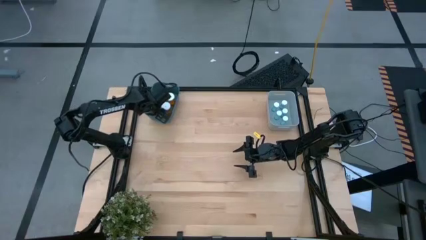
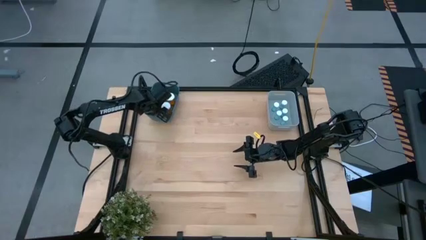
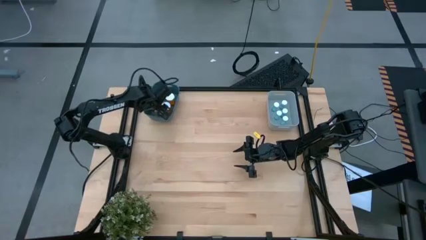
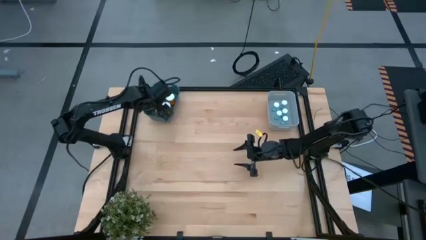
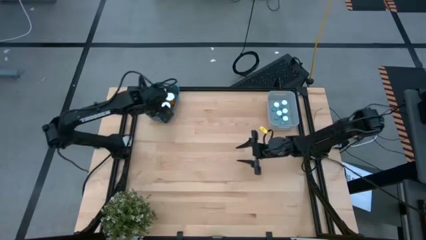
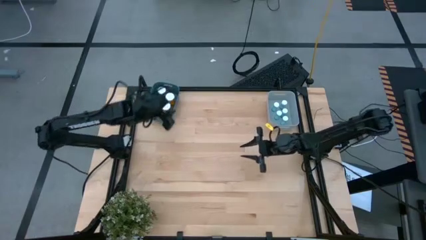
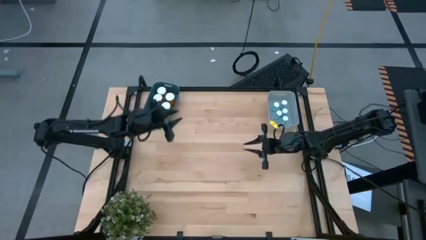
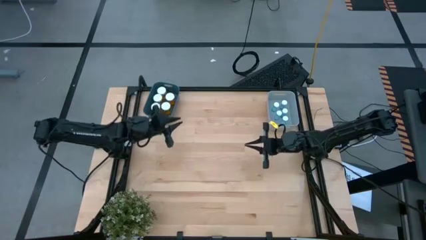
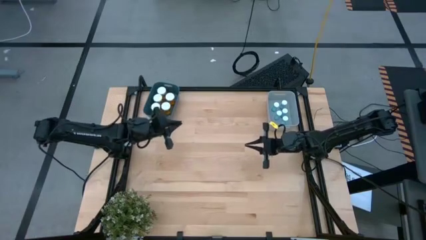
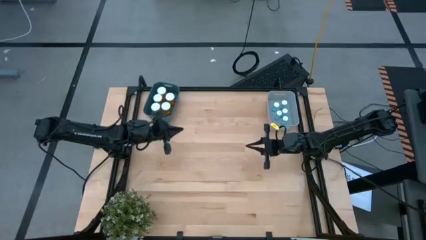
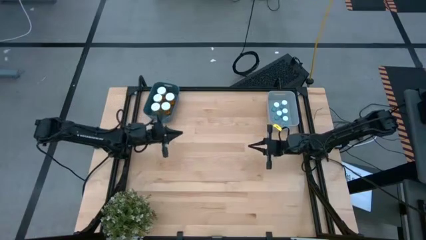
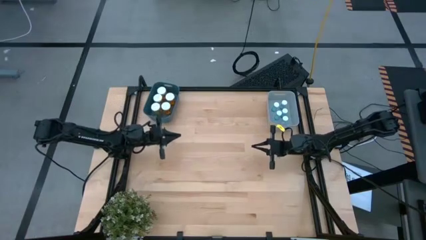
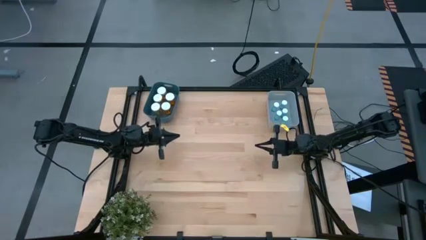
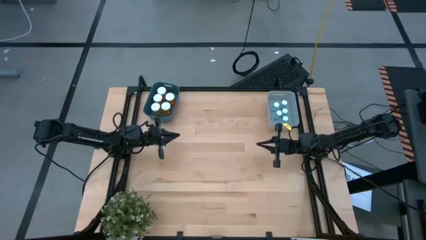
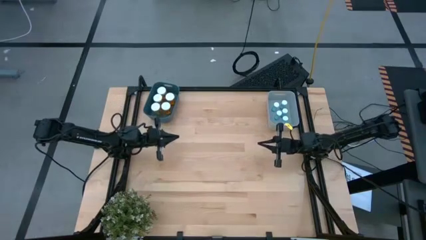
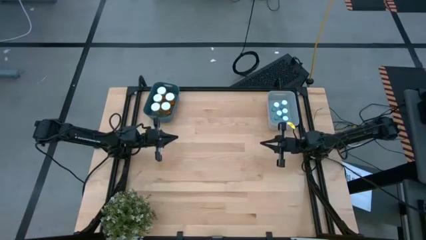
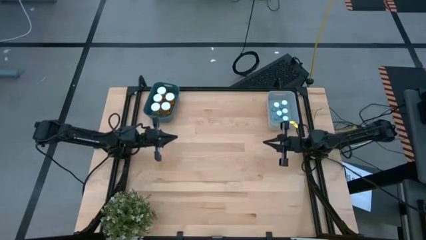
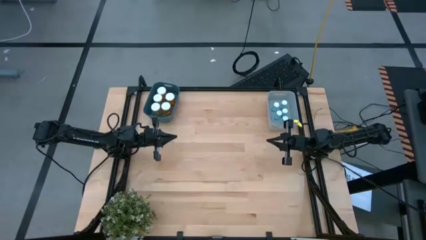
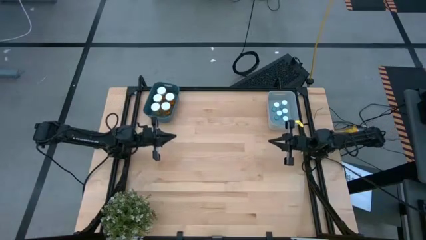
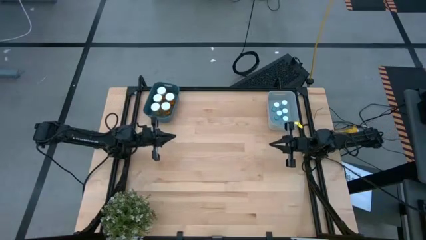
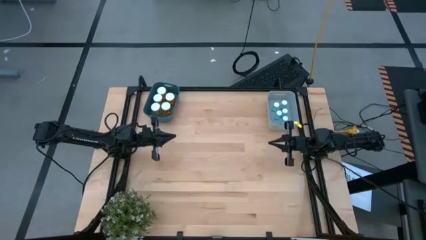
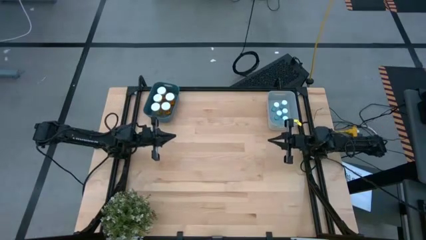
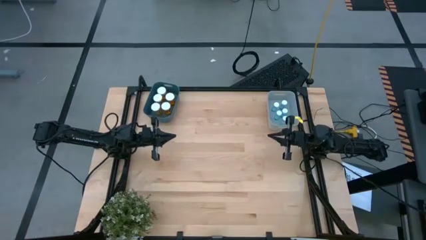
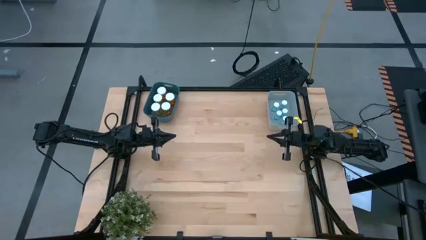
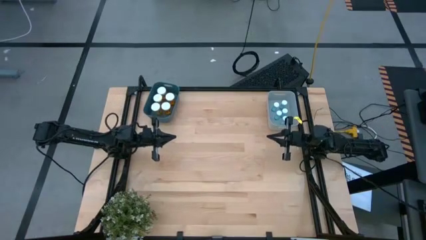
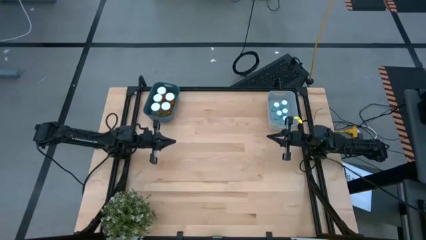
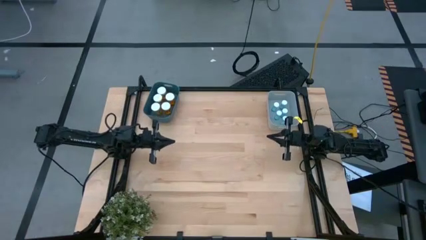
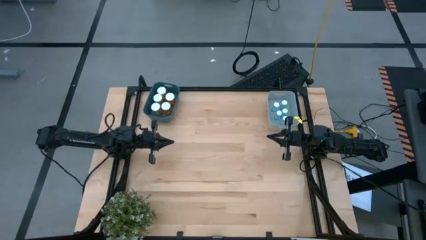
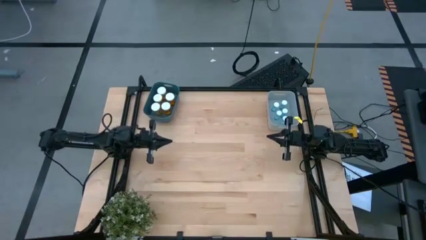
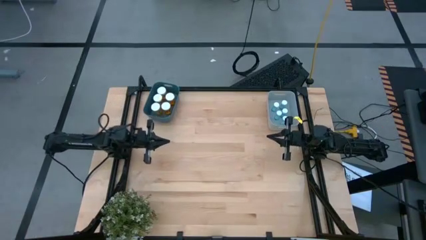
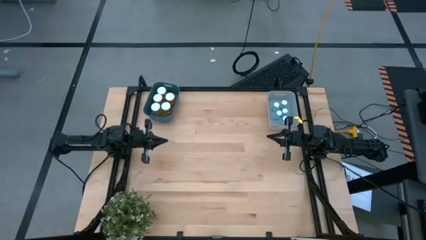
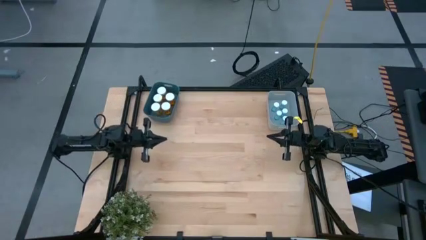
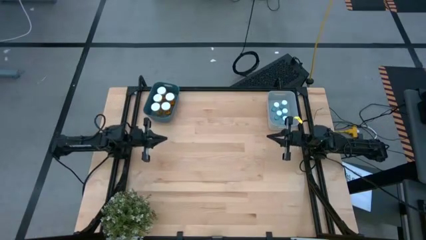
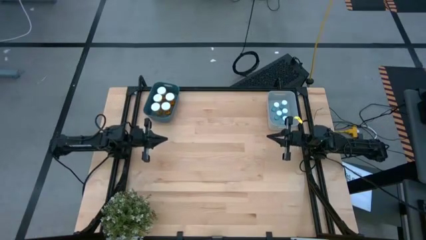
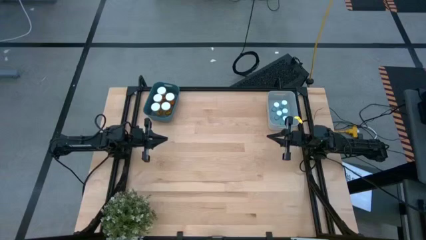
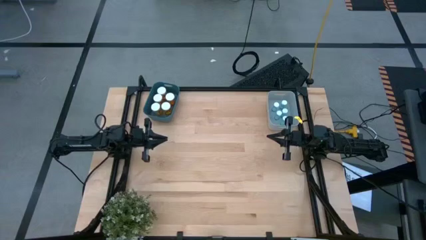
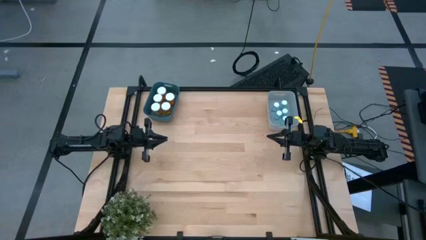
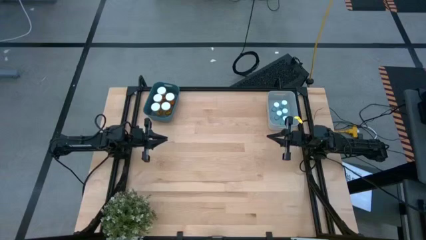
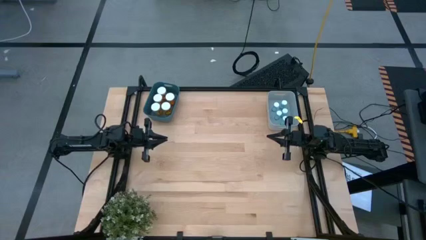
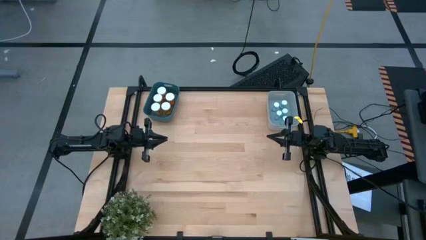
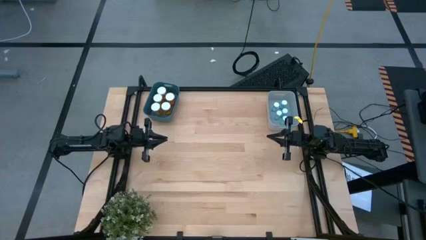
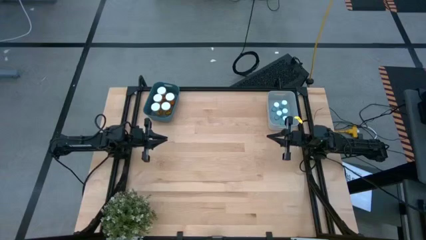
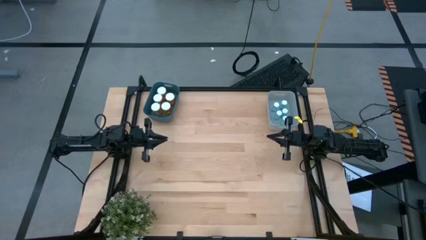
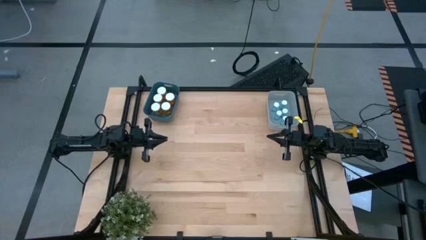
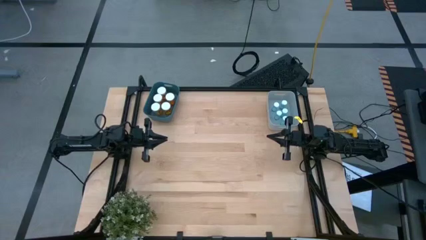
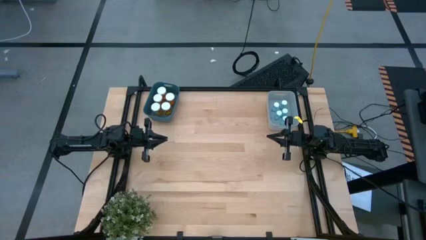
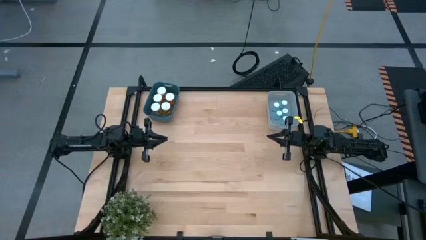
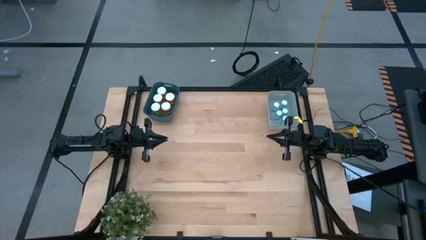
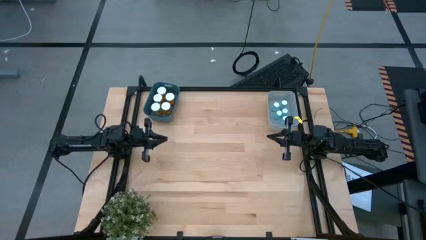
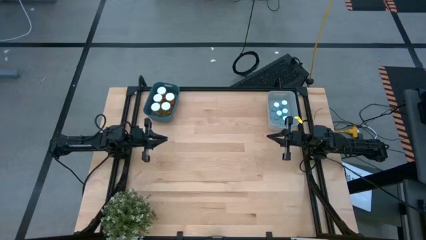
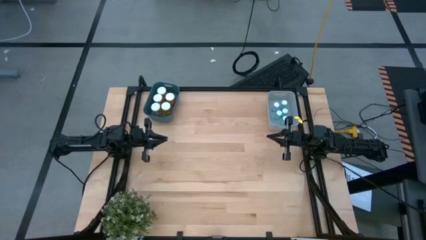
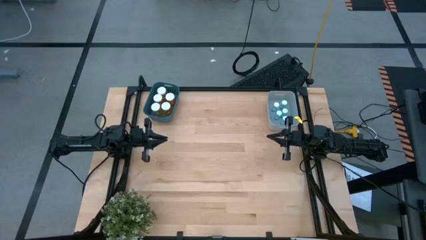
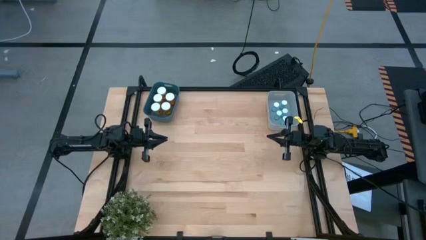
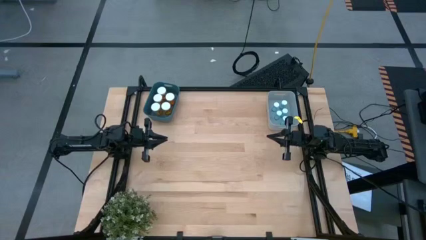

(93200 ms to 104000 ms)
Task: Pick and place medicine bottles into bin by pill shape (circle, oval)
Return to Home Position

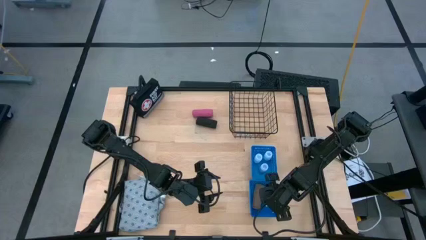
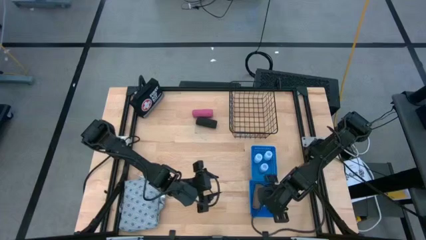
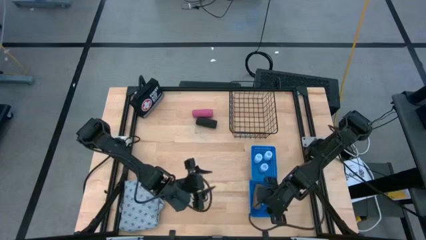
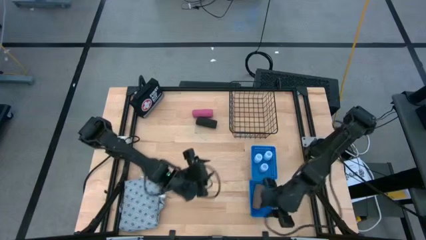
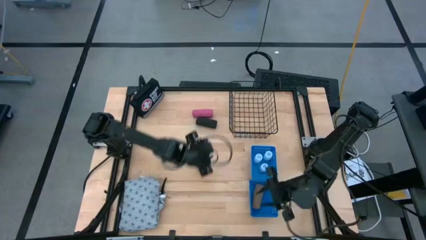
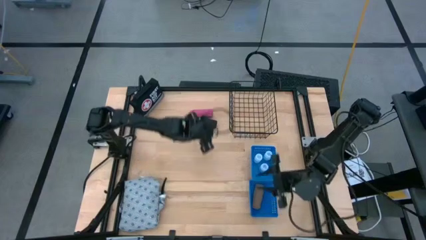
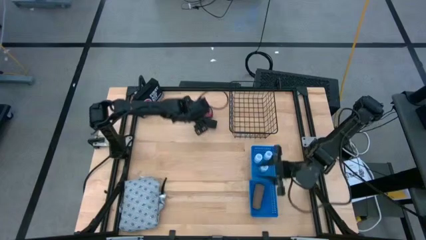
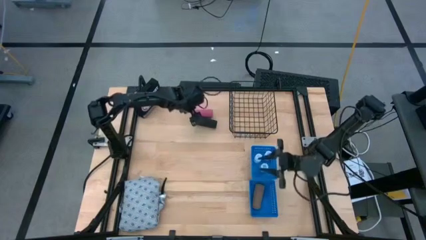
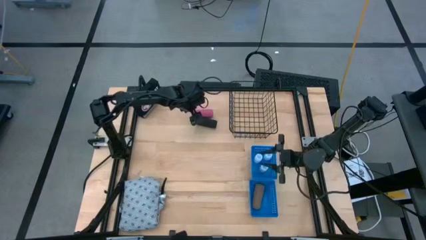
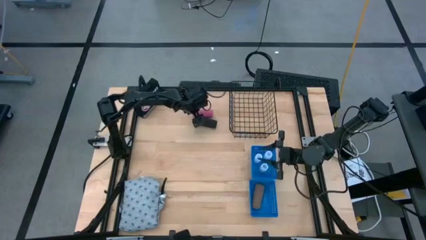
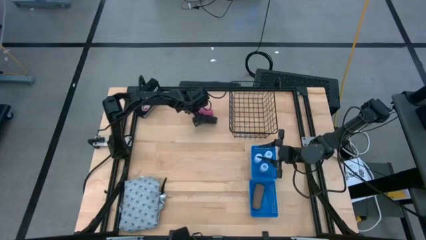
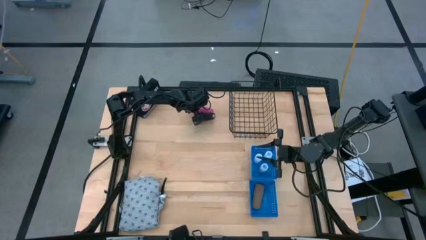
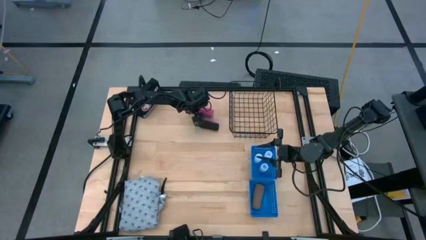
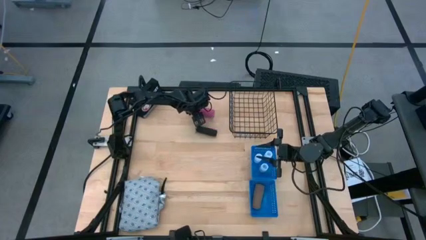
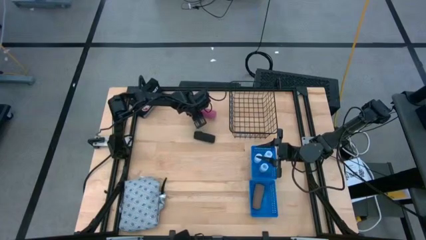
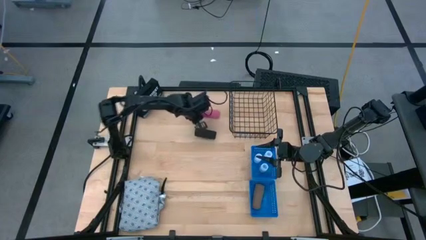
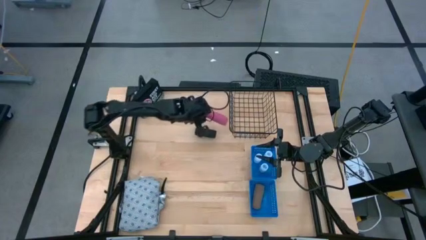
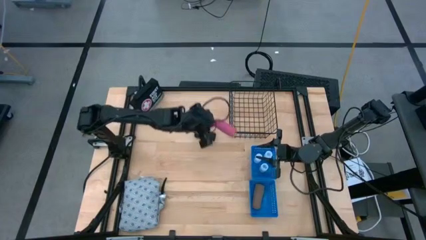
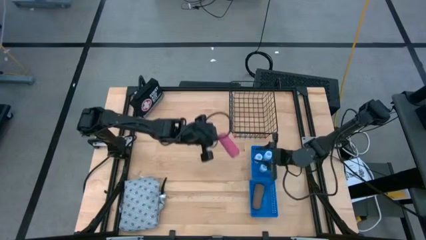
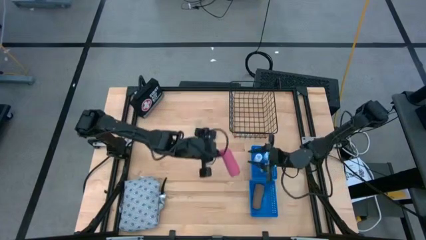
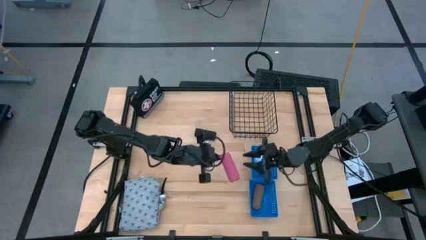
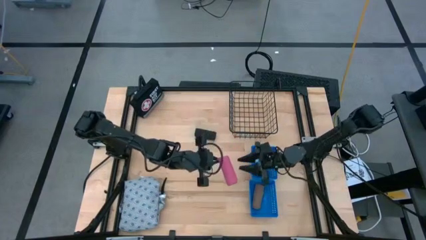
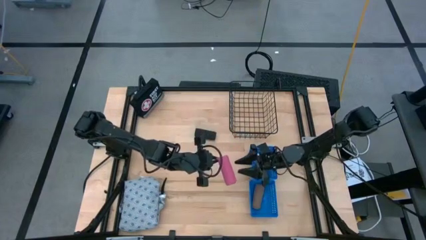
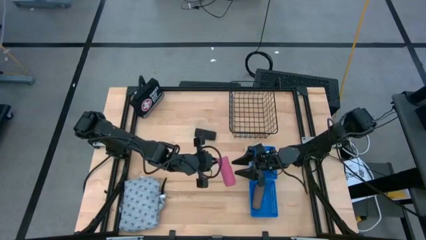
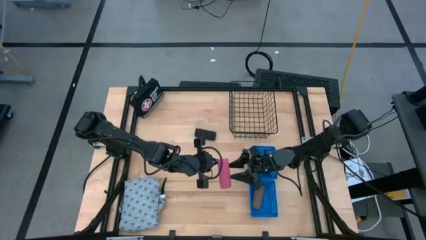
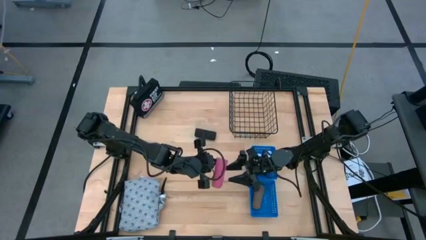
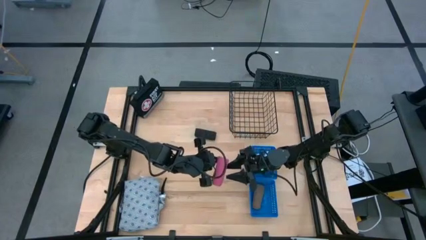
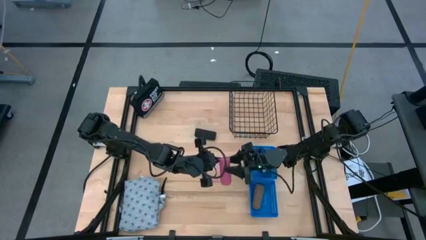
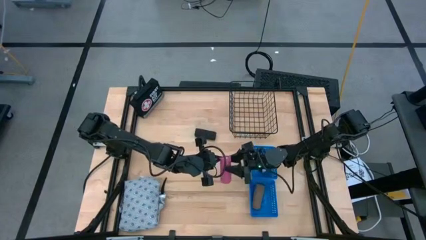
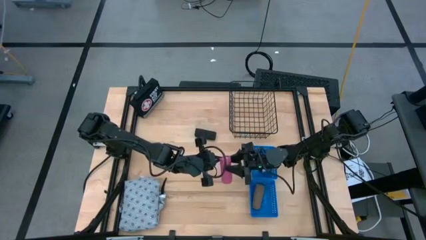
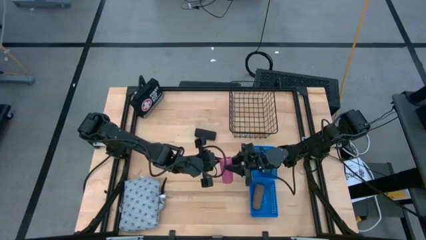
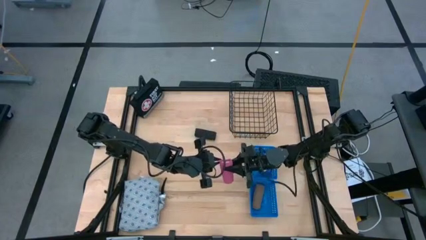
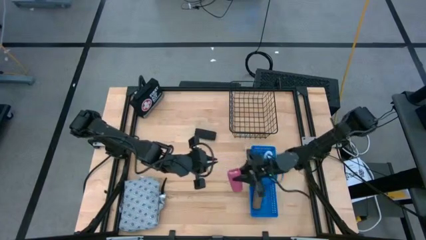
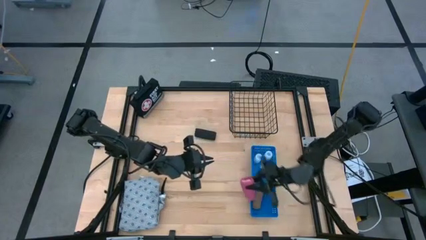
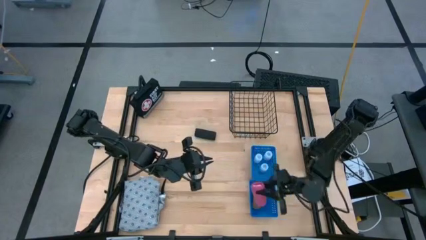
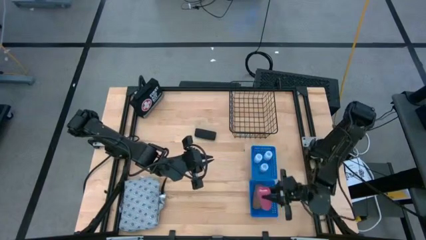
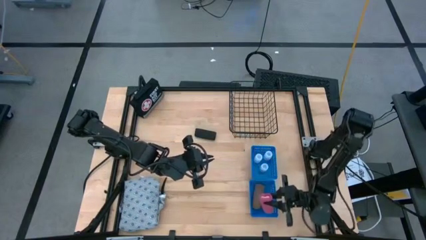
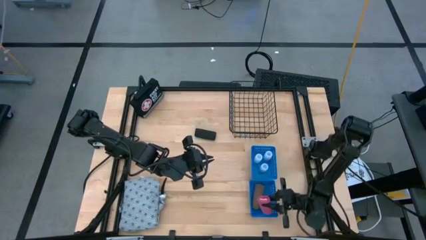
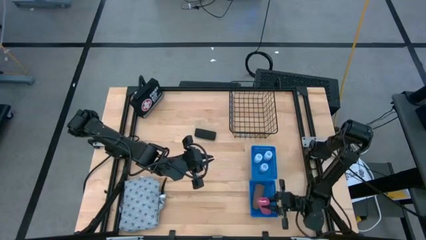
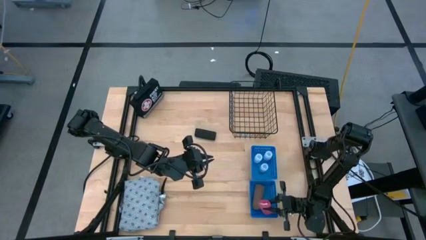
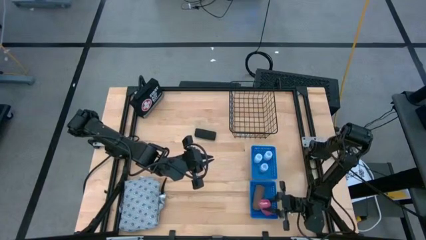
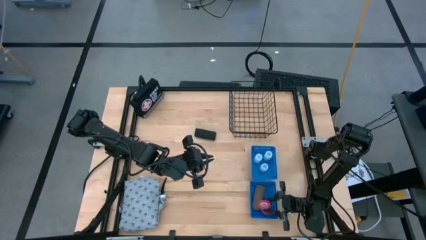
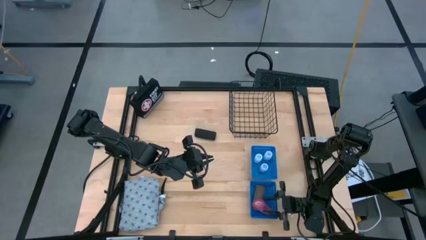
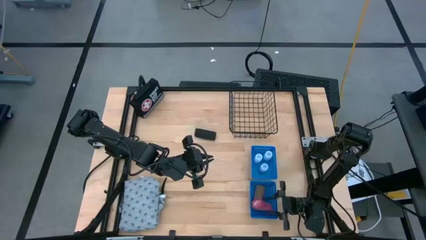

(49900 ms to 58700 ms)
Task: Pick & Place Medicine items
Put the pink bandage into the bottom blue basket
